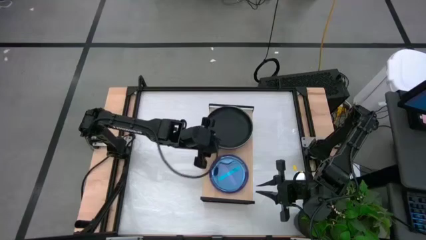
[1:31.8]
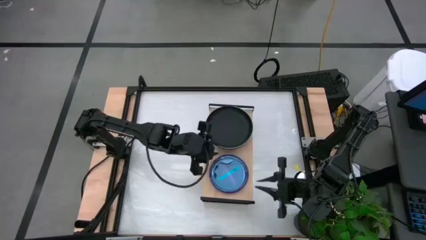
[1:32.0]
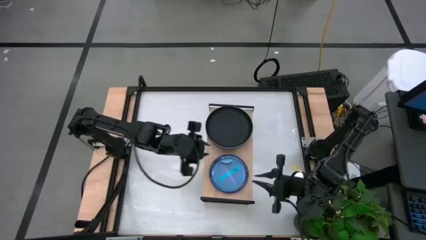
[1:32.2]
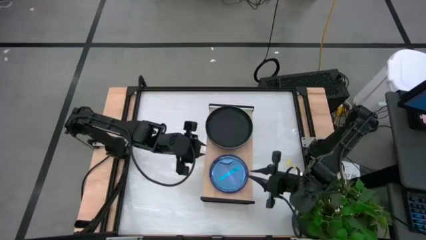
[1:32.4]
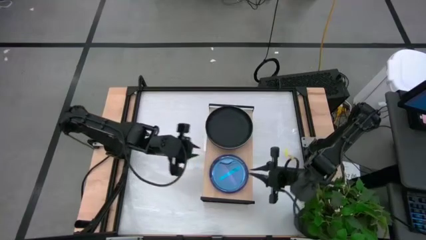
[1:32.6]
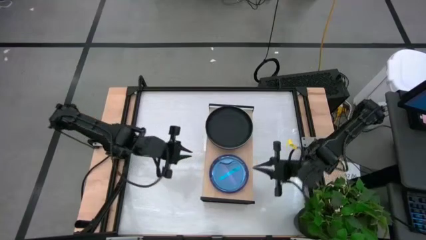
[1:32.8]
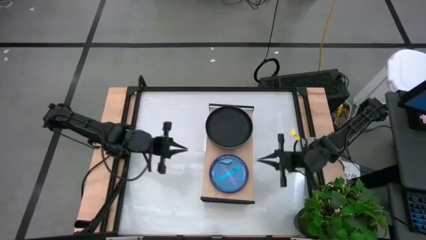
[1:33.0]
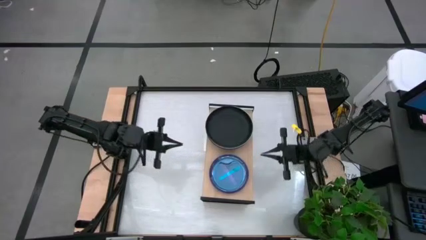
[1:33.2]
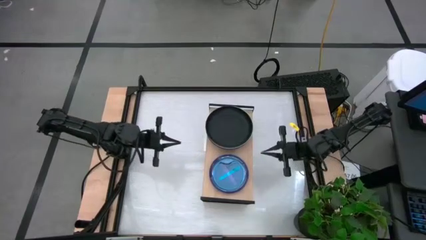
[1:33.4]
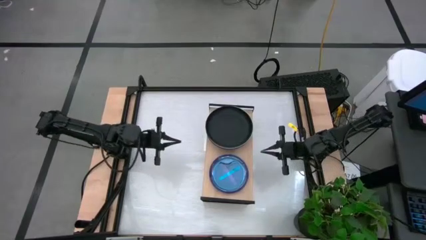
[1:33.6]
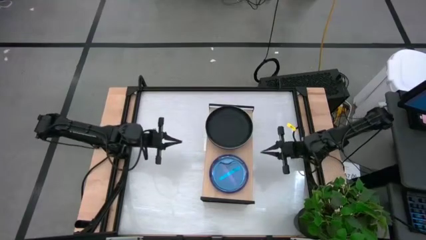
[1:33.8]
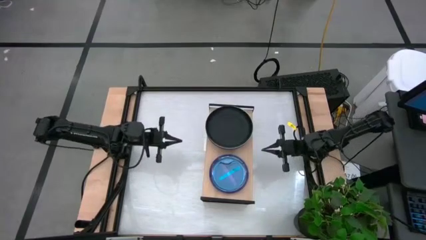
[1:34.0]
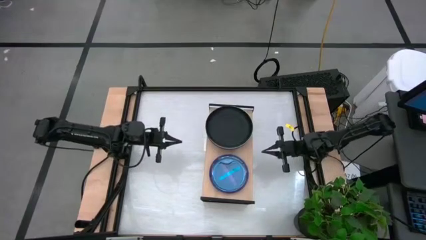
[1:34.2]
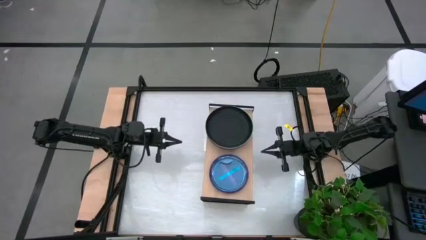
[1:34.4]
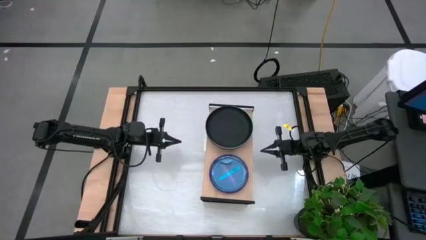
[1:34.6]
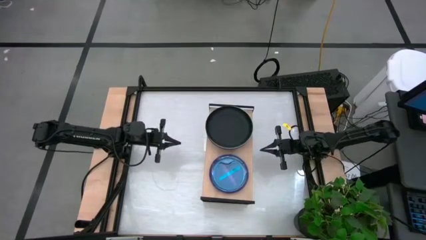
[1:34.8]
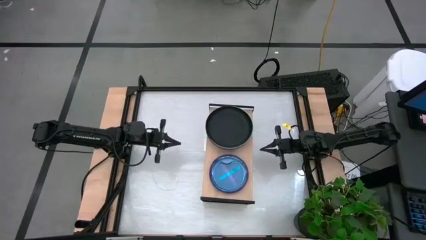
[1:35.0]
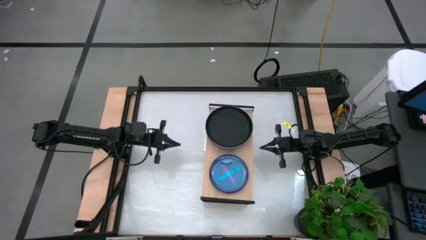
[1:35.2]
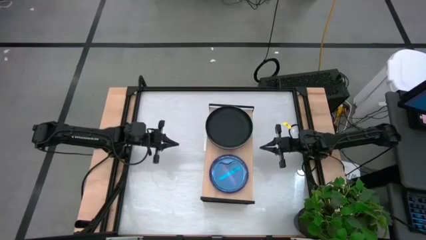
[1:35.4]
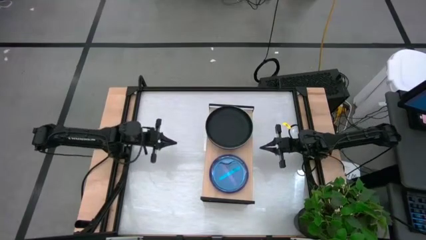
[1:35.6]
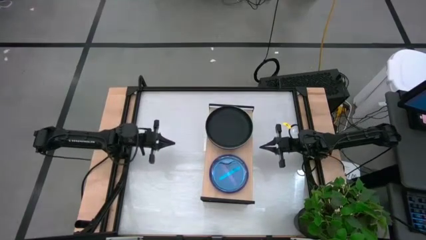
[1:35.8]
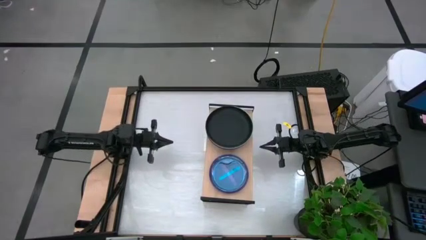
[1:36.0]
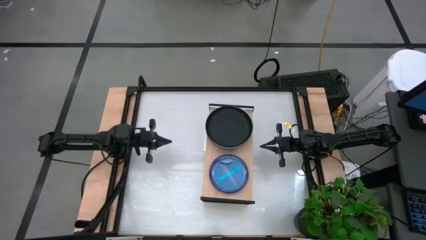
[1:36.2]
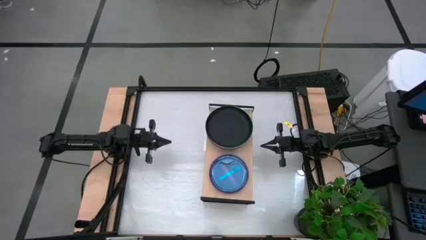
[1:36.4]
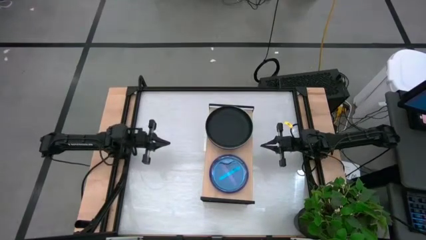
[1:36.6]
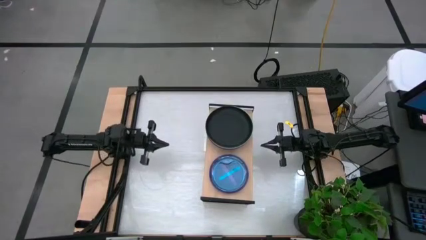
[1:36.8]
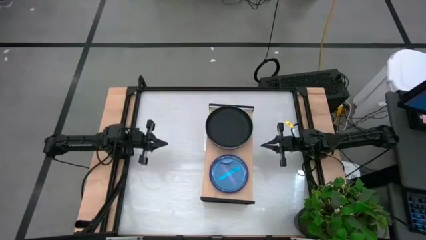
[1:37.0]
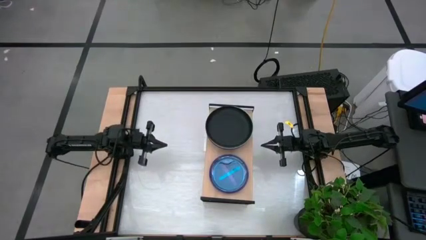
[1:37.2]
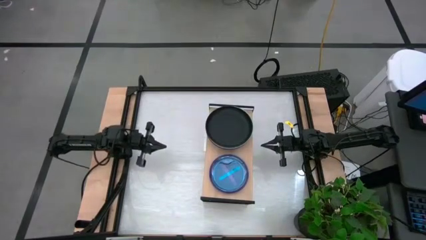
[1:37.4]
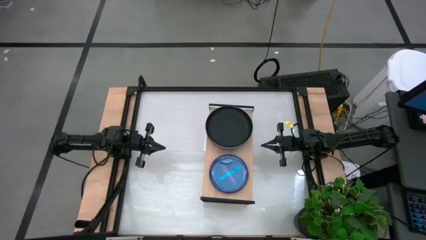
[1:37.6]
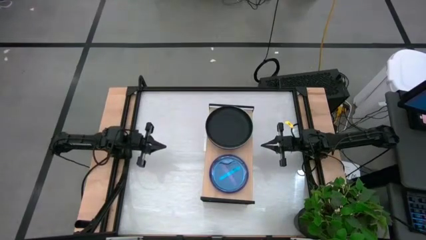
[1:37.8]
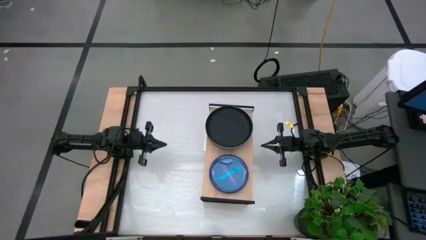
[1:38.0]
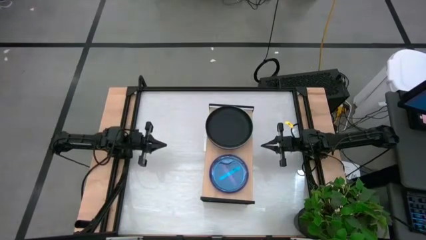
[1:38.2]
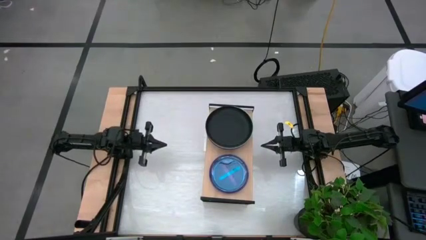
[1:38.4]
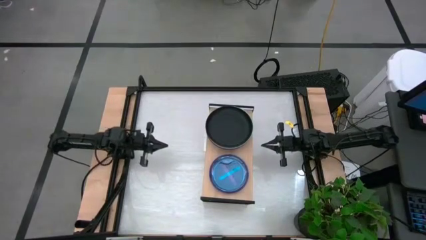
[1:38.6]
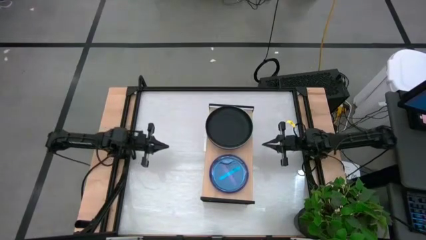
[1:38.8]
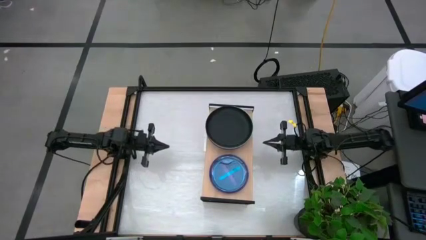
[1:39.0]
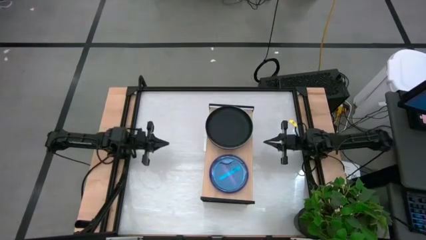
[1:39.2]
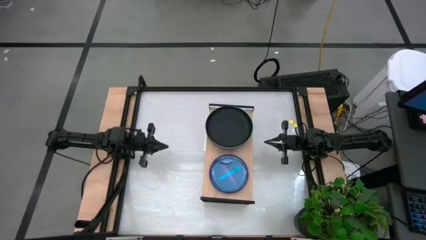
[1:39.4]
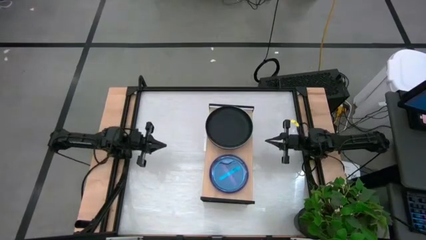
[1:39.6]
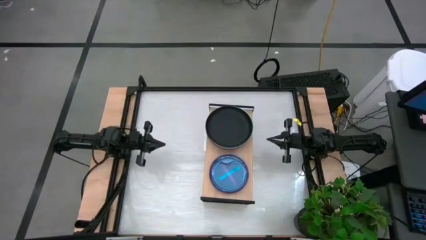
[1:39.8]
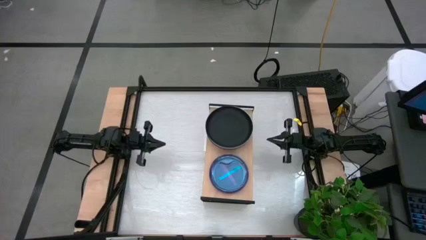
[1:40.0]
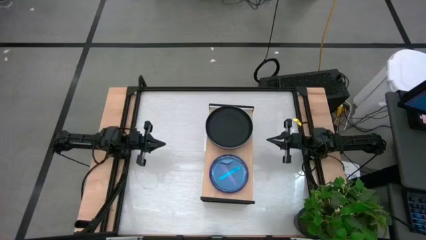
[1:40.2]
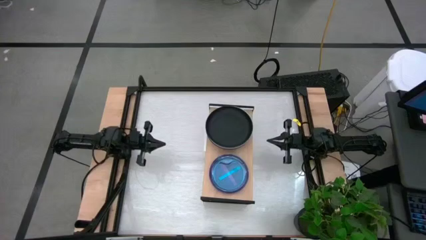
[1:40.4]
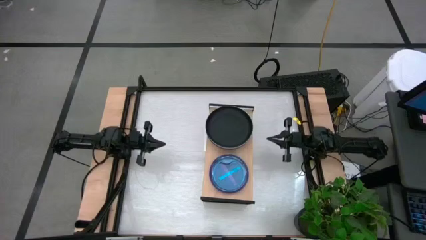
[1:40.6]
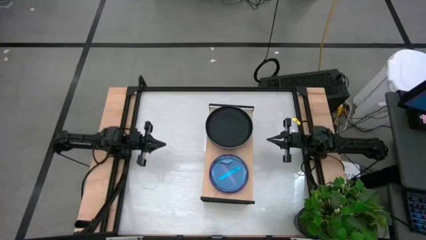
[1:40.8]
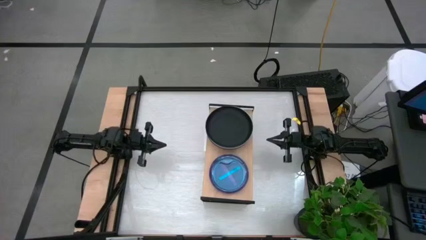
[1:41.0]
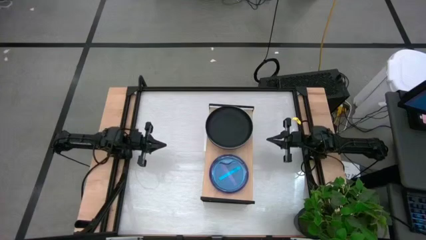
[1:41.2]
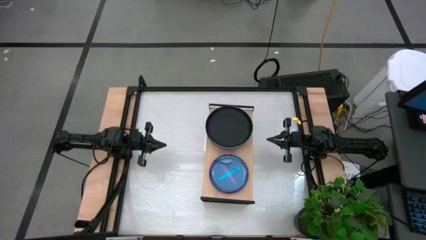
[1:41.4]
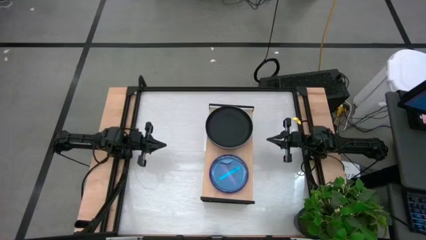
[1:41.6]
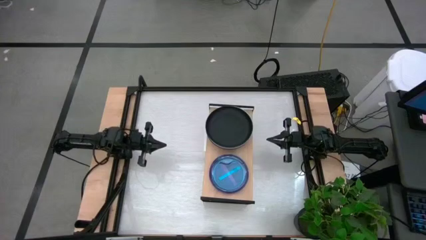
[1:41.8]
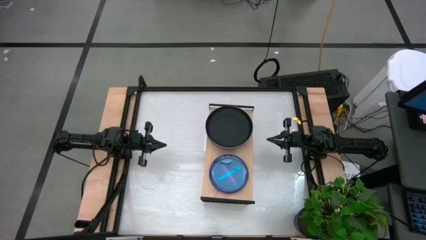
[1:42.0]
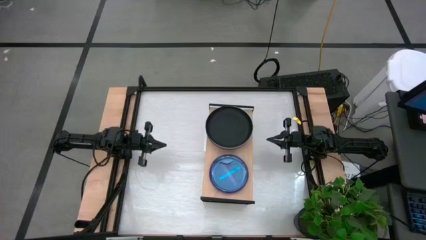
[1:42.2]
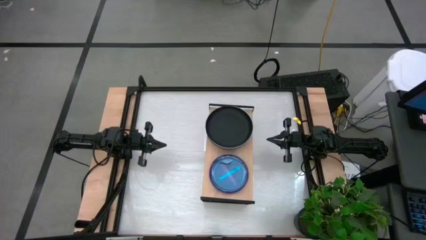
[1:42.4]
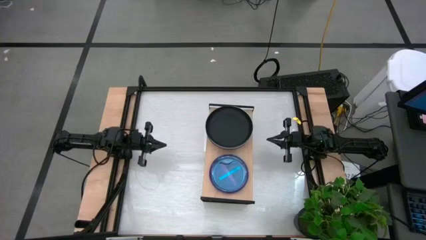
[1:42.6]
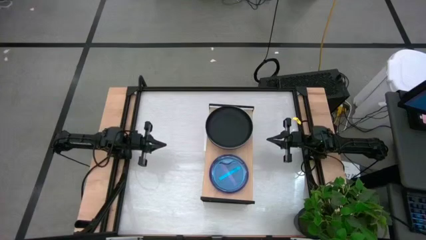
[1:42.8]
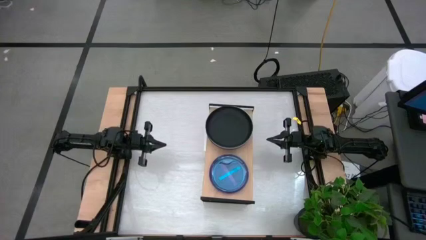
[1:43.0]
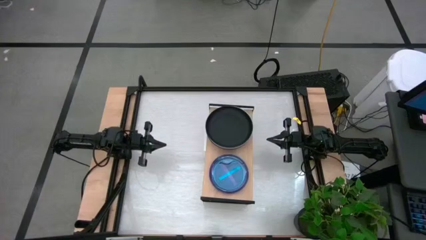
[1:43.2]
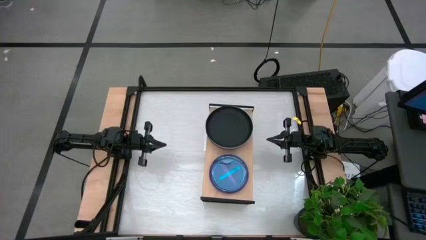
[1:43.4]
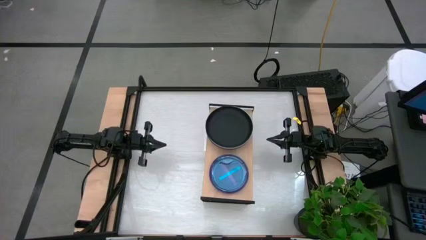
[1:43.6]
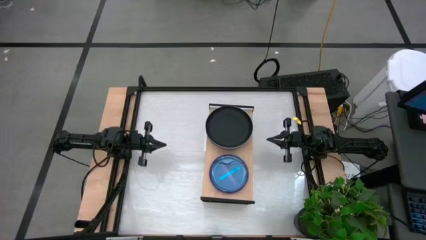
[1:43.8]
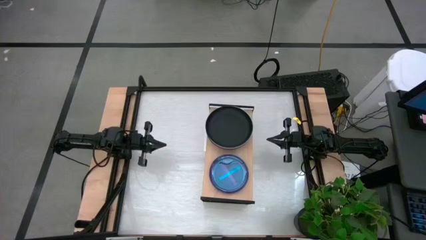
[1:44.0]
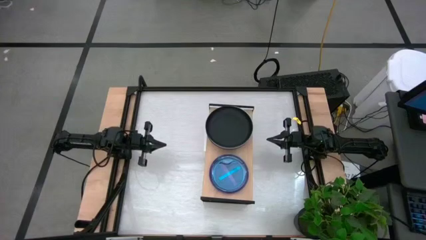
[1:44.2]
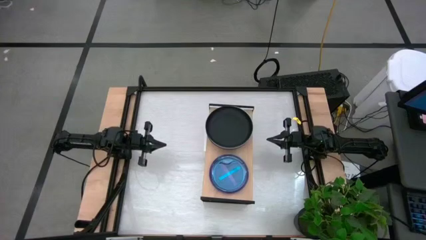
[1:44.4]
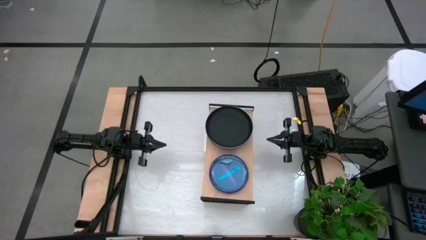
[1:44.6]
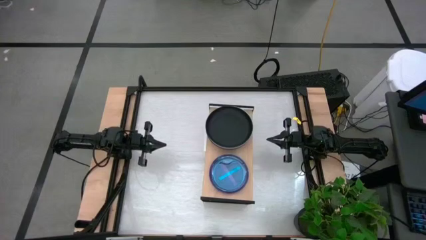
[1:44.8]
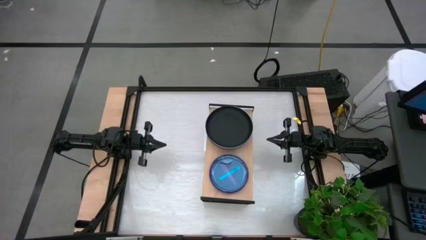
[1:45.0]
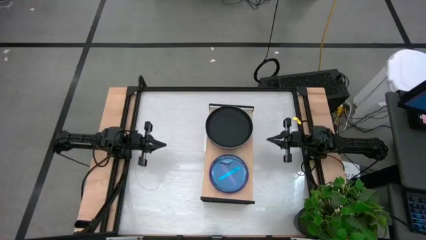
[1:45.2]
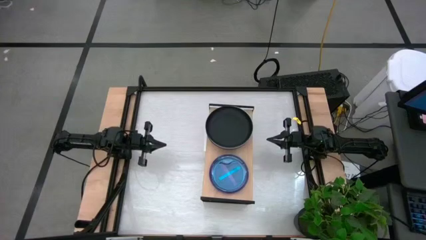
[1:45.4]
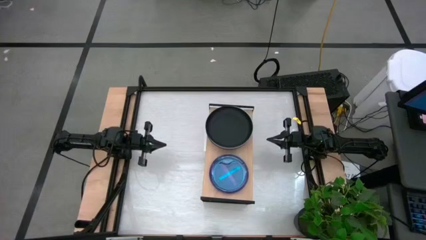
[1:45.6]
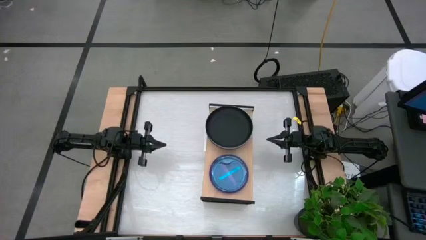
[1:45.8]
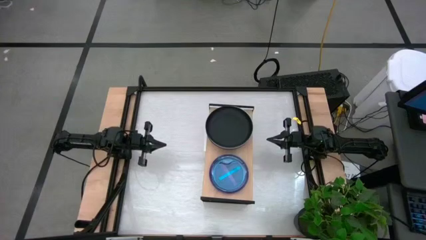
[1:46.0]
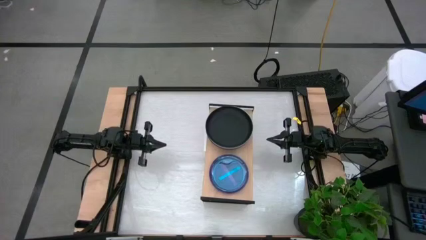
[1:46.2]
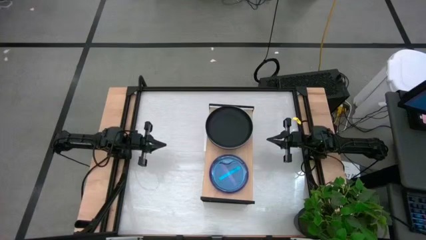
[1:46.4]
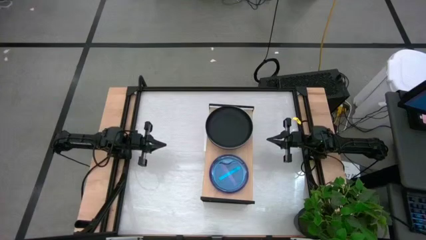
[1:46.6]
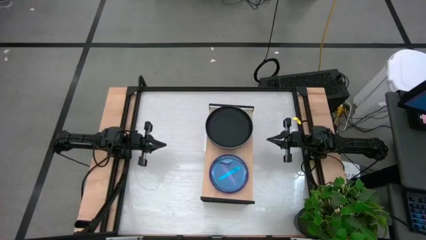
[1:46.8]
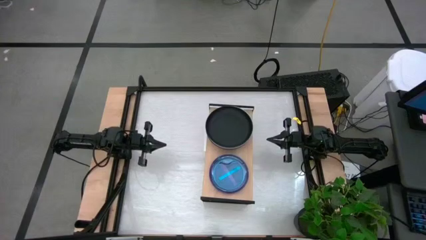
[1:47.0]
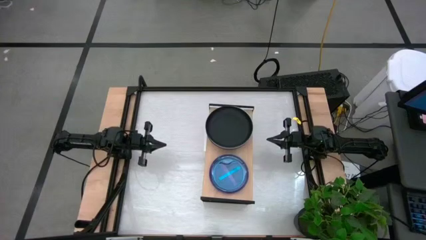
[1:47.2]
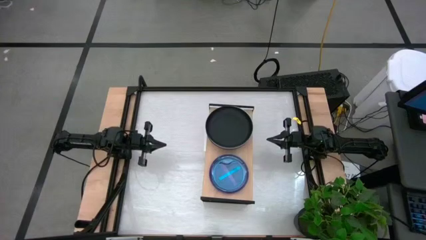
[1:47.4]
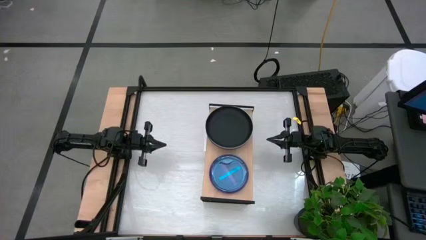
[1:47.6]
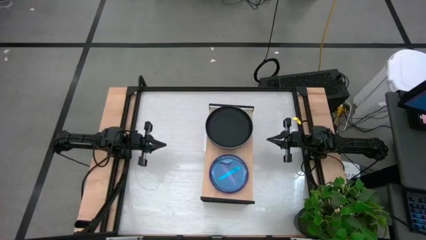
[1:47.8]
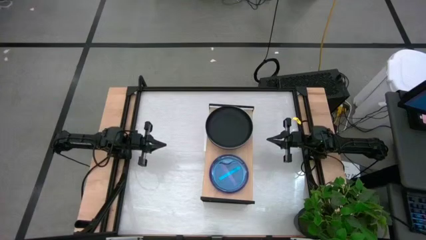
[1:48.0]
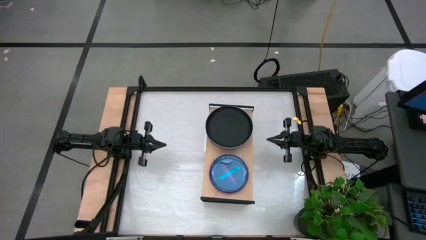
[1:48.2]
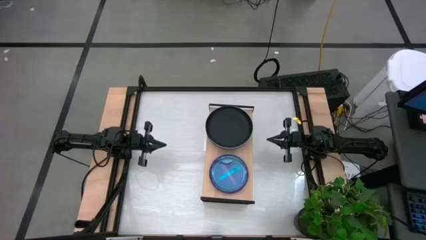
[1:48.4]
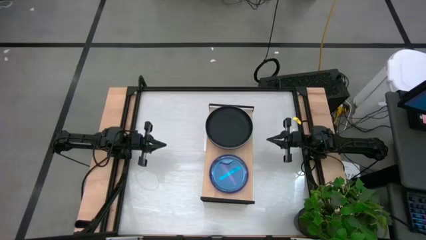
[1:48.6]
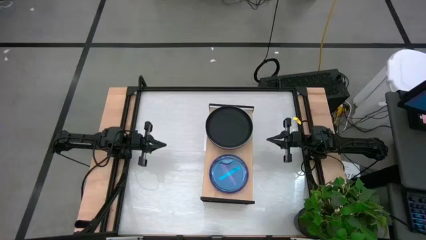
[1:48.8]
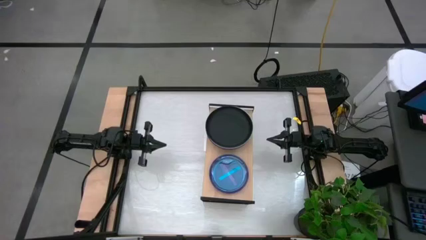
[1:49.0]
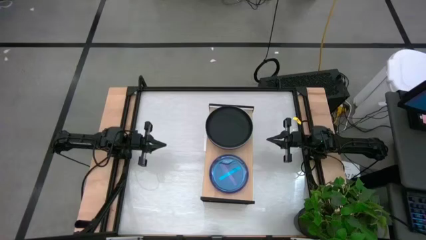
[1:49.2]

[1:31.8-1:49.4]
Task: Place and stack plates onto a shelf
Return to Home Position
